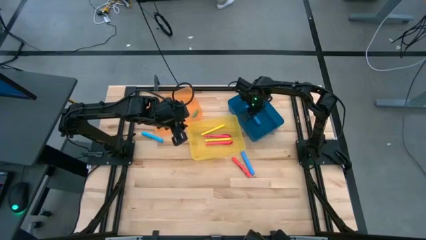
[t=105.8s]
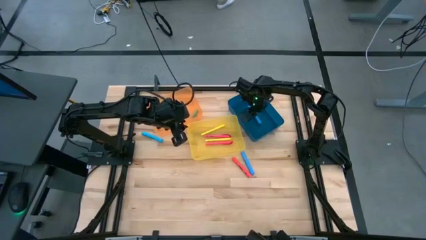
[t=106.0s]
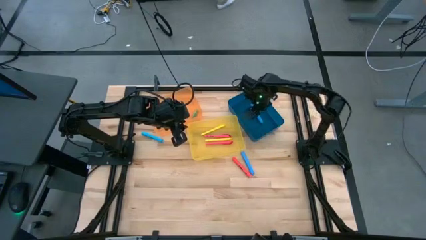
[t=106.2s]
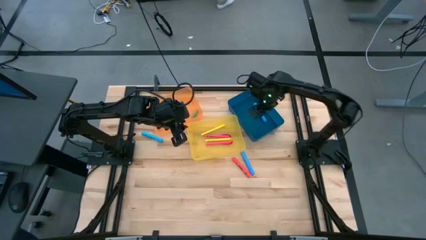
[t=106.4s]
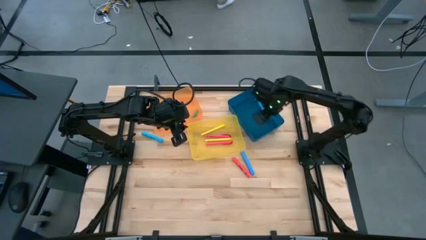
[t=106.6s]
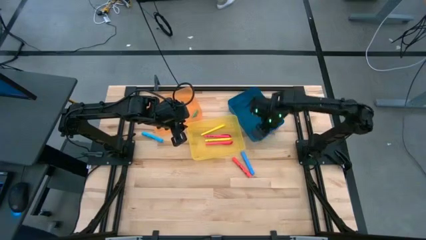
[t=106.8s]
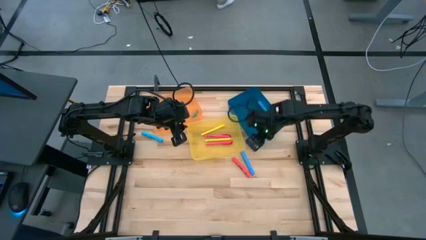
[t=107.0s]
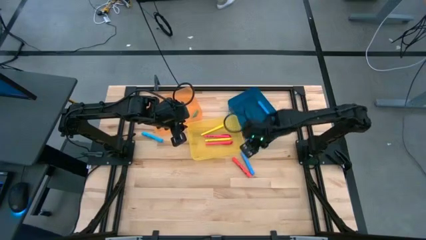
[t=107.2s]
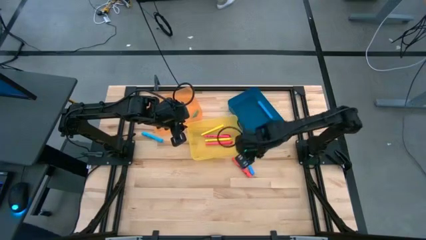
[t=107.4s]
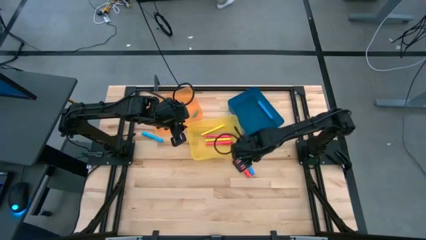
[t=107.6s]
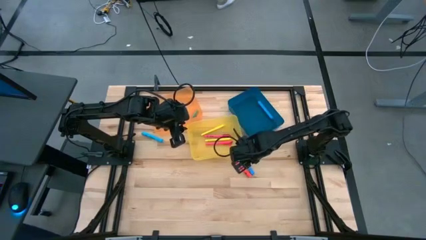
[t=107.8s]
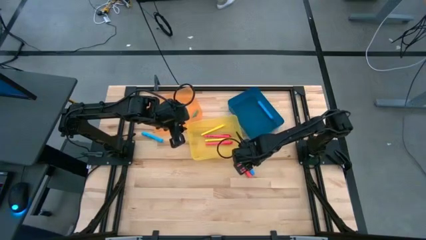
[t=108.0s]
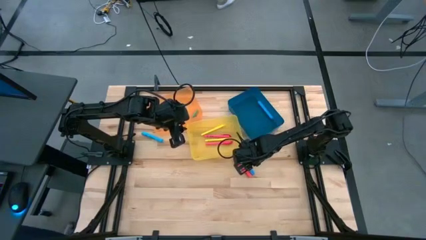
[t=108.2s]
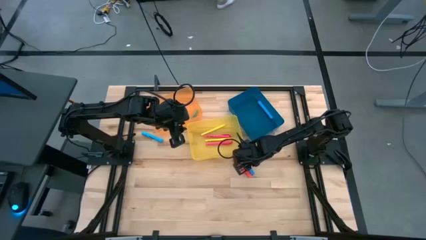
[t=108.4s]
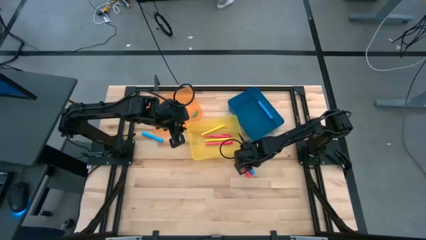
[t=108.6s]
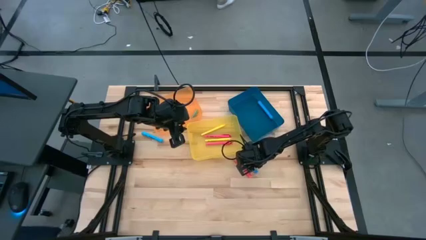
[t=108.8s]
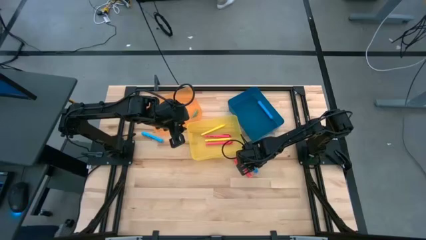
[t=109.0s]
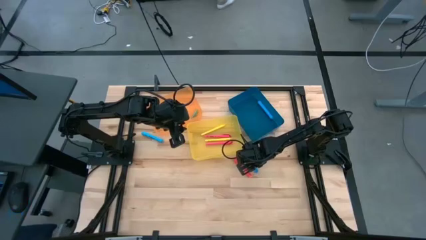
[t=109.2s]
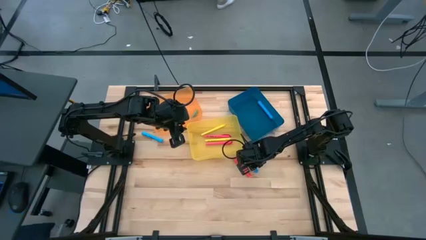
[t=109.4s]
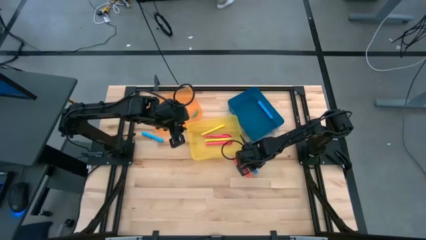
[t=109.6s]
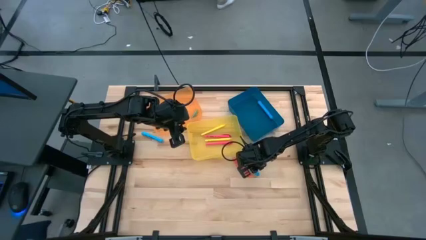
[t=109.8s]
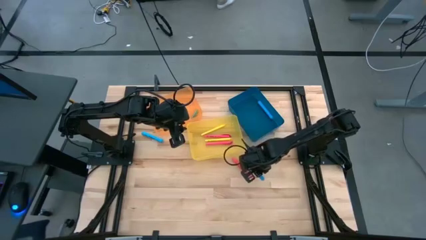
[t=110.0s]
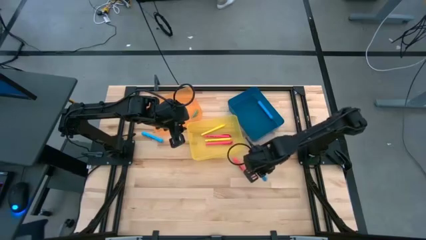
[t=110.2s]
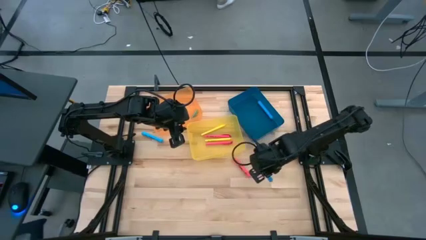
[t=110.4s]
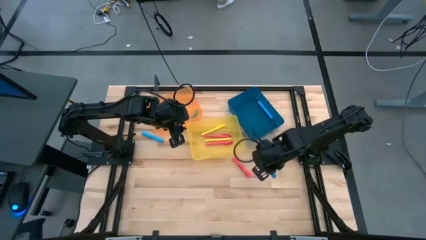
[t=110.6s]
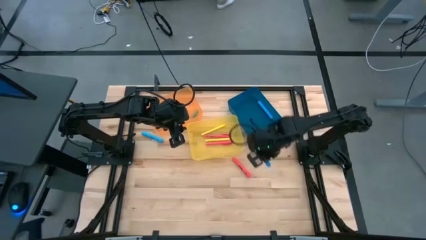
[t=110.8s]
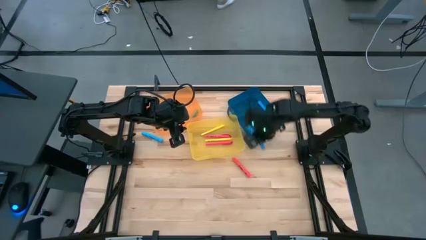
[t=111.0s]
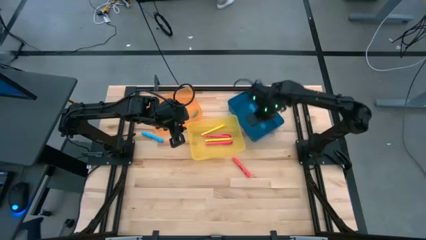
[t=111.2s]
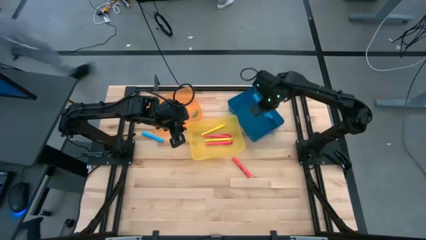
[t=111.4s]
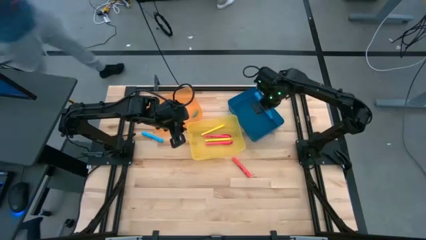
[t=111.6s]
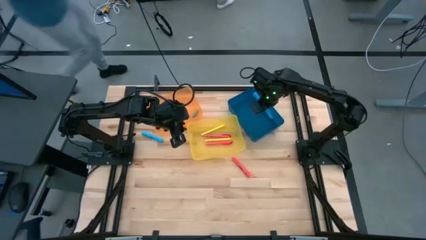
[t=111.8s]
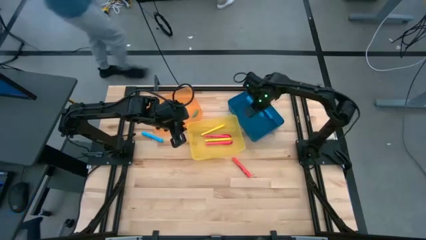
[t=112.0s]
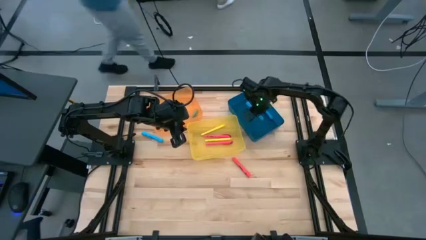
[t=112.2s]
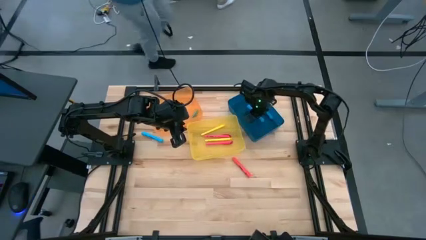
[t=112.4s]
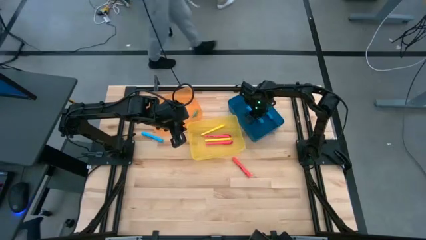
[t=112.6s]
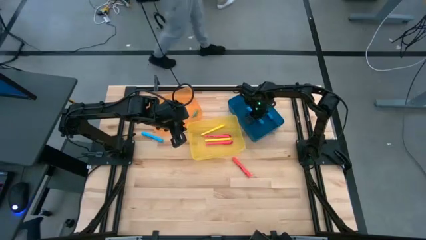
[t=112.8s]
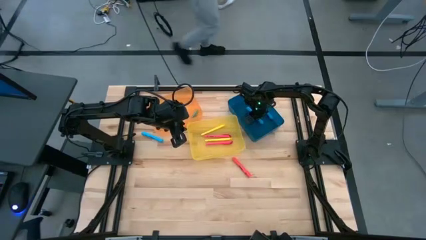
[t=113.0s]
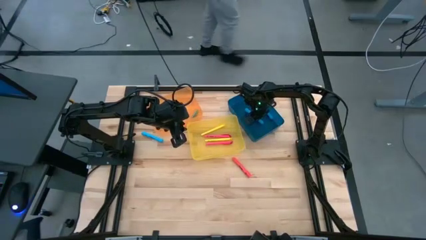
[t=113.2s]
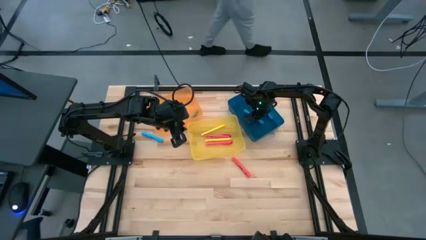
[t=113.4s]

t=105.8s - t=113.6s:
Task: Pick & Place Markers
Put the bottom blue large highlighter into the blue bin

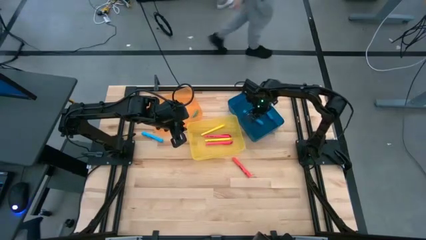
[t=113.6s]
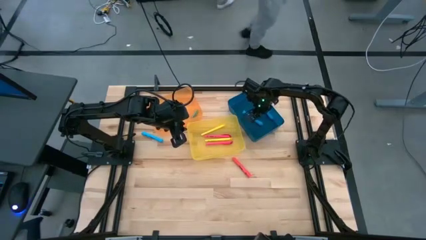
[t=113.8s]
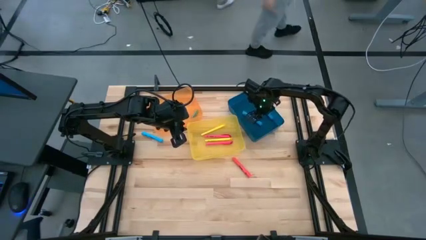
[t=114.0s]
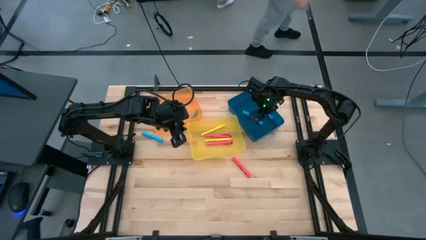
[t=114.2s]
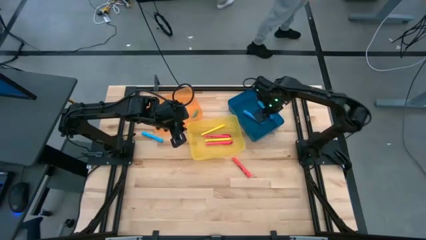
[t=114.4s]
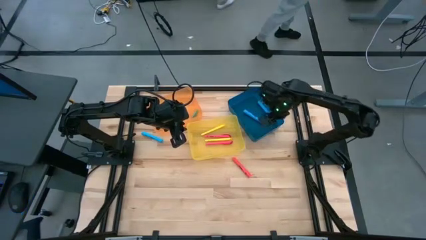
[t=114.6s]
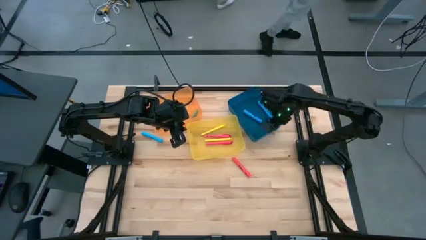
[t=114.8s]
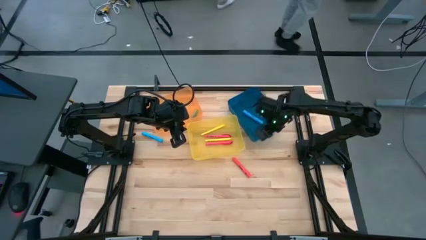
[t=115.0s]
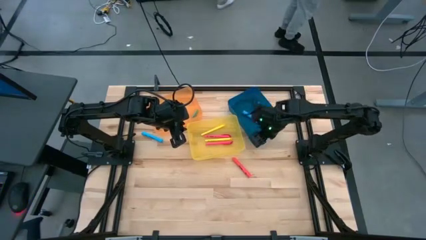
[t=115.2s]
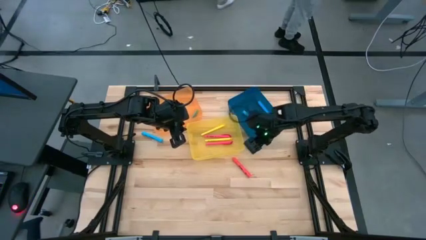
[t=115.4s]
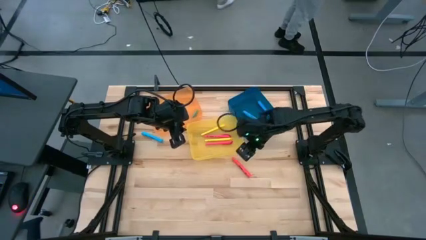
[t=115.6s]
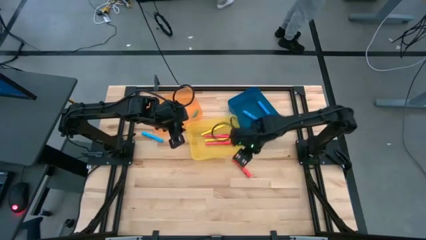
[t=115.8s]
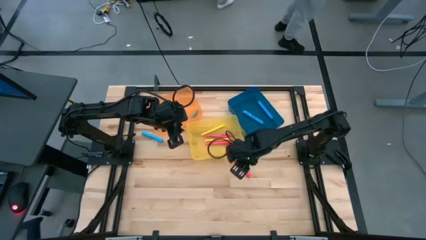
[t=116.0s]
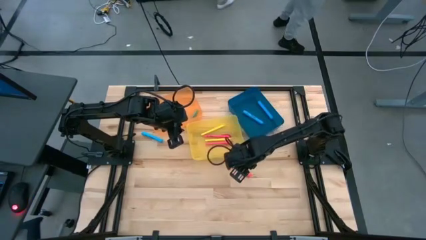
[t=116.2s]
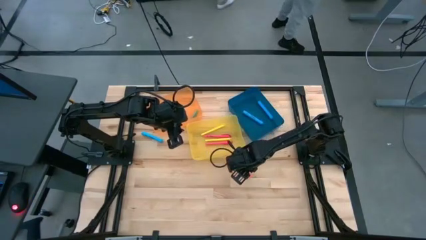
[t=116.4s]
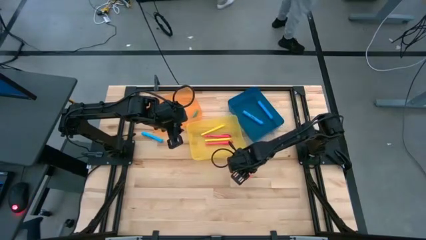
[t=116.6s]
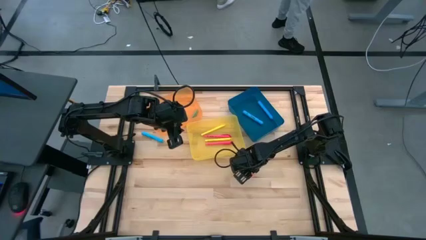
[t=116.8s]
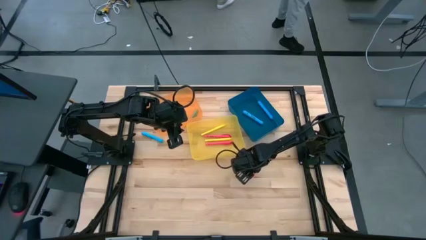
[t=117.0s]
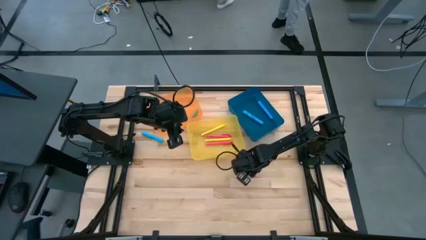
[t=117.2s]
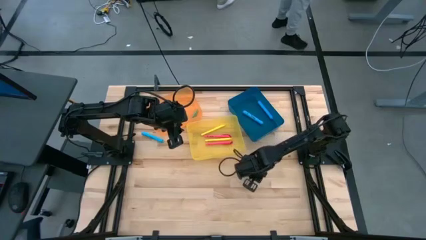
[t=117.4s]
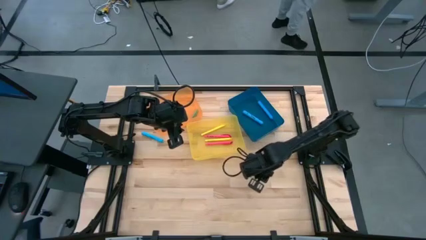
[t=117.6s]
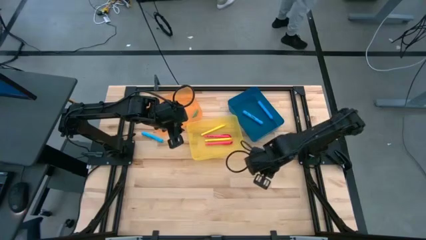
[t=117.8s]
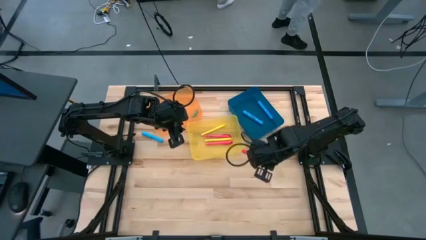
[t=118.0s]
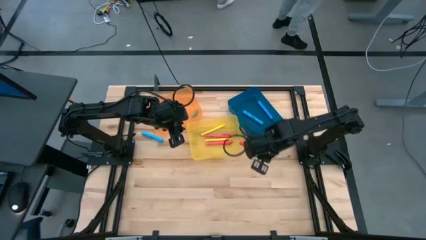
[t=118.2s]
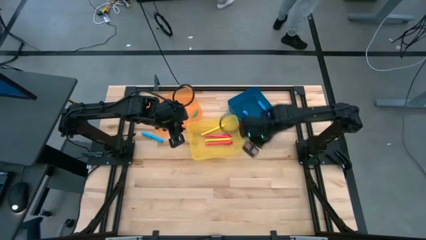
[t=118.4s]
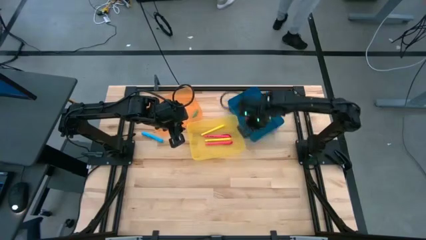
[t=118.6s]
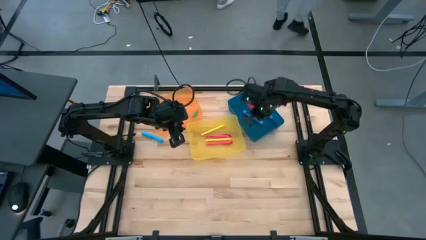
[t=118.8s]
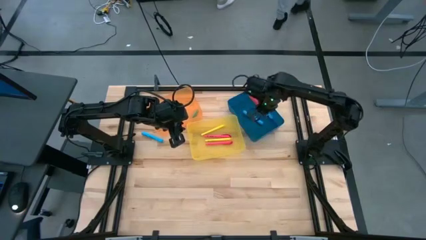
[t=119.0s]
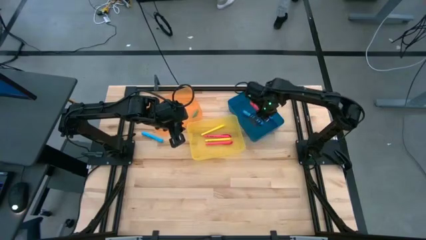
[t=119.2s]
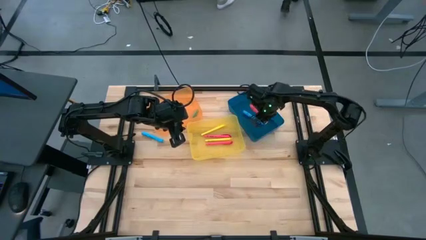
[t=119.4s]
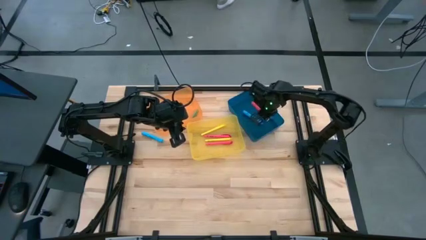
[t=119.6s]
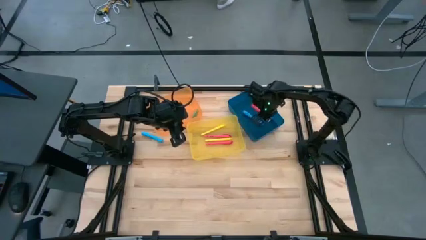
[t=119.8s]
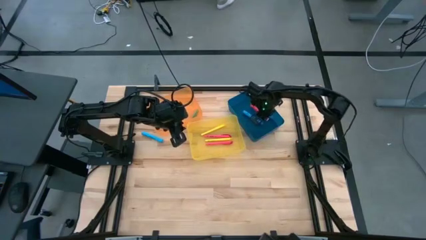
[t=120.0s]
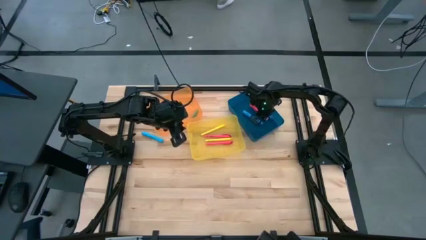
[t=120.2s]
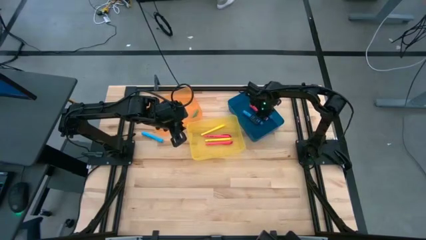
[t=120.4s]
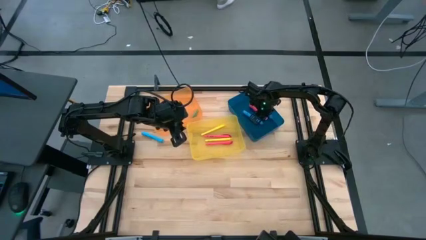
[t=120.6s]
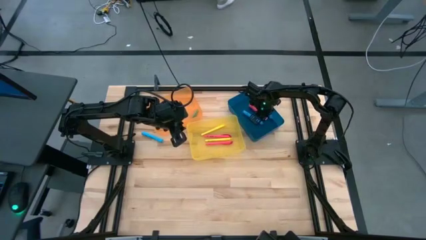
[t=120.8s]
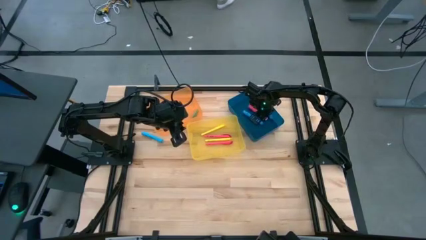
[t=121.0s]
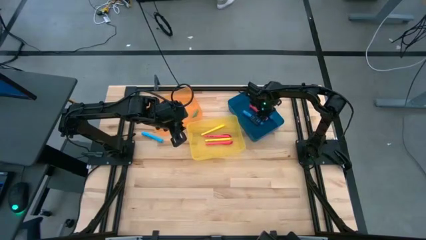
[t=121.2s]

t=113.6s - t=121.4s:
Put the orange large highlighter into the blue bin
